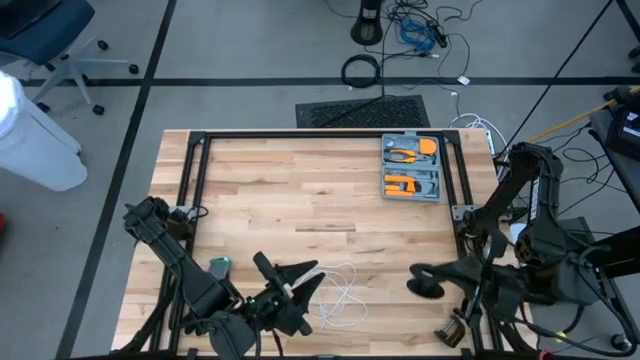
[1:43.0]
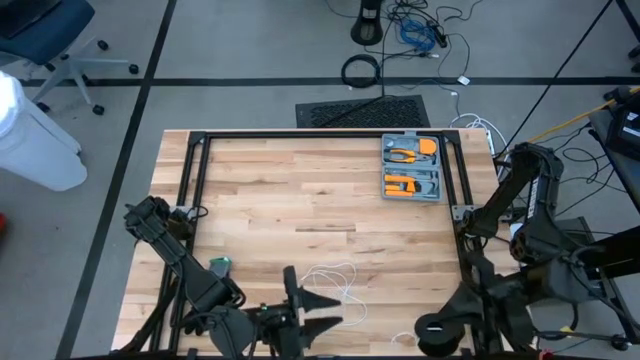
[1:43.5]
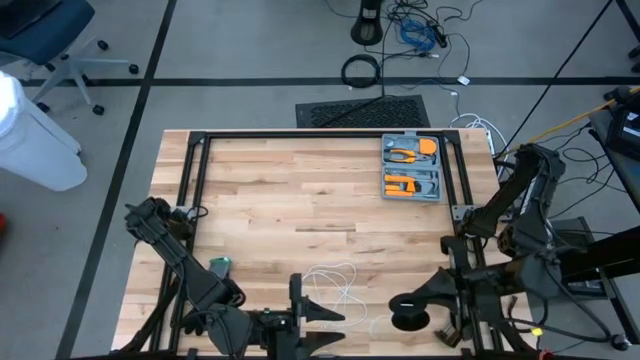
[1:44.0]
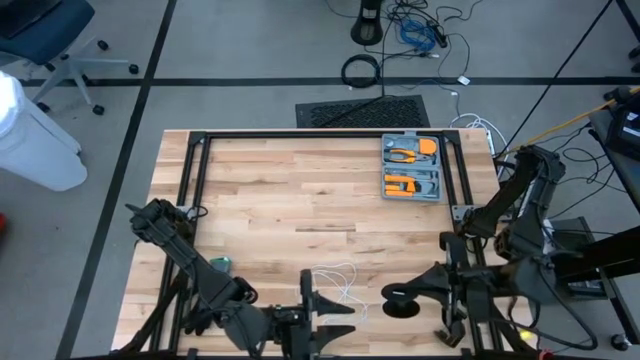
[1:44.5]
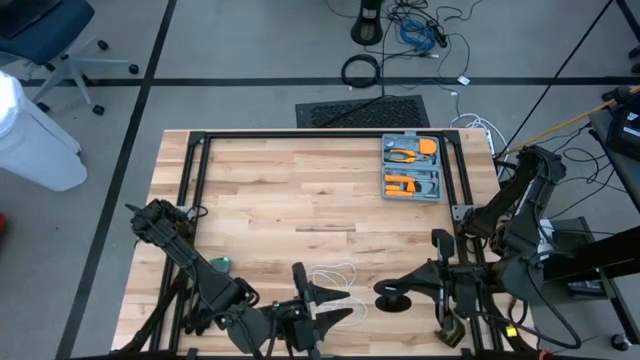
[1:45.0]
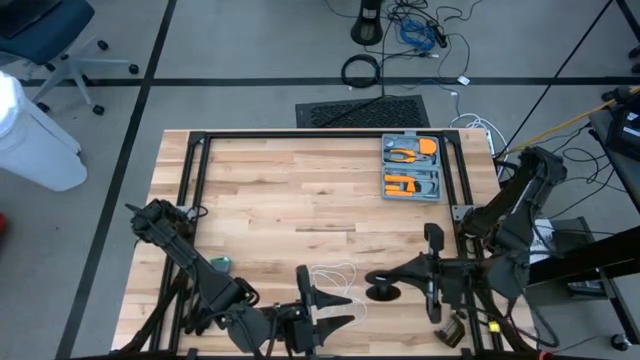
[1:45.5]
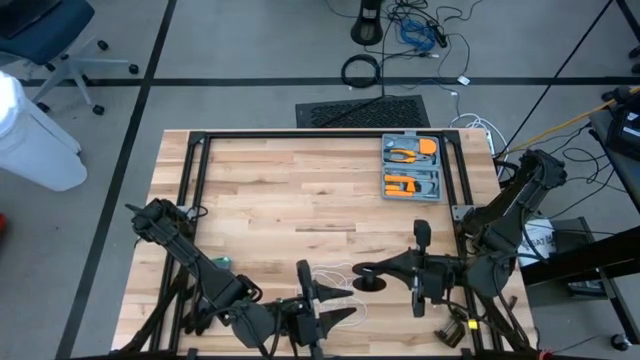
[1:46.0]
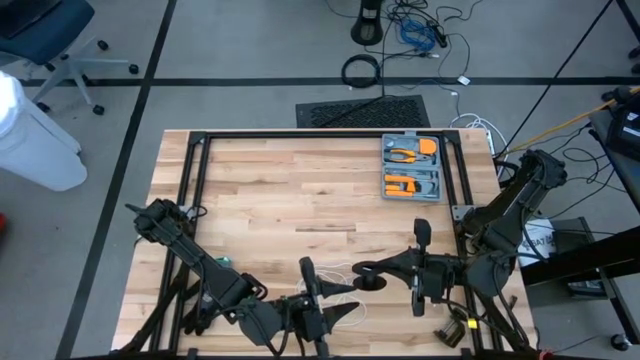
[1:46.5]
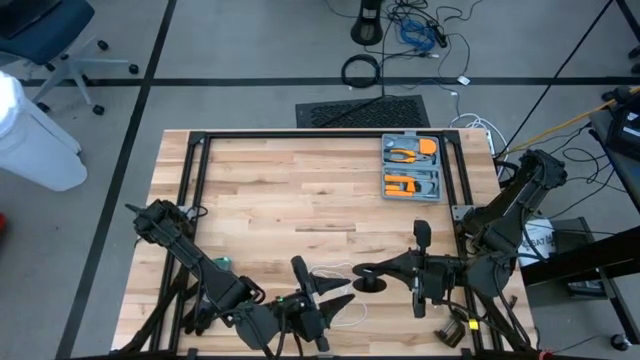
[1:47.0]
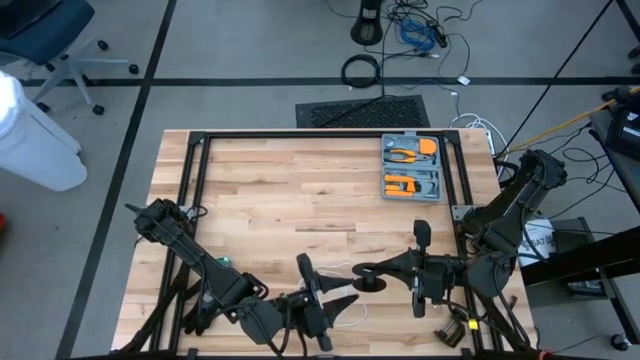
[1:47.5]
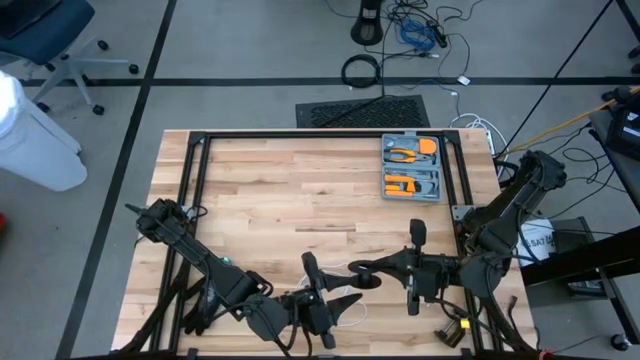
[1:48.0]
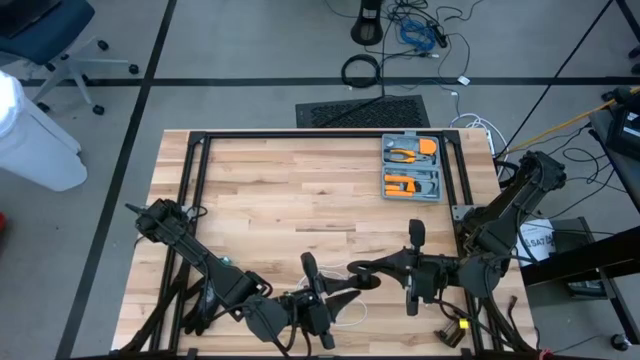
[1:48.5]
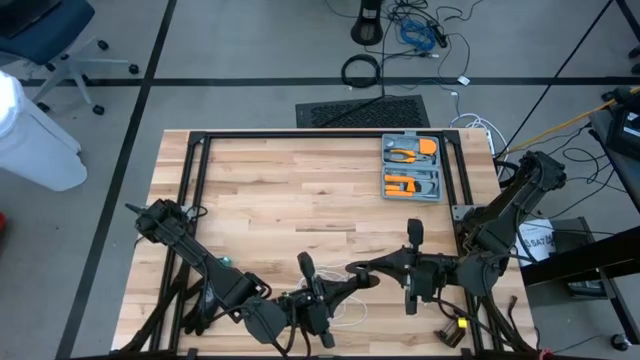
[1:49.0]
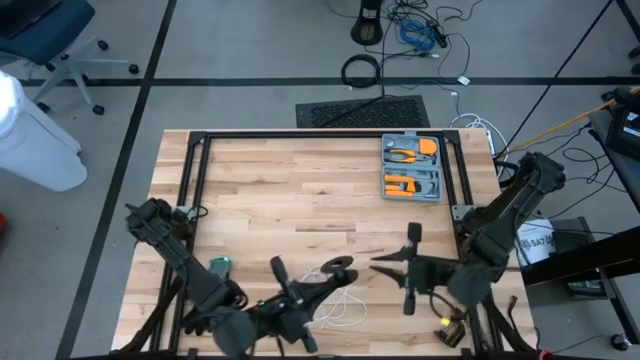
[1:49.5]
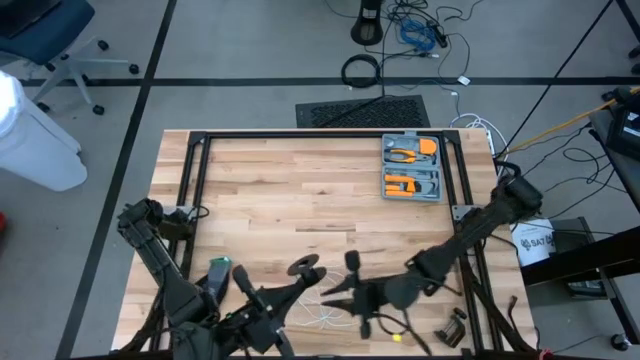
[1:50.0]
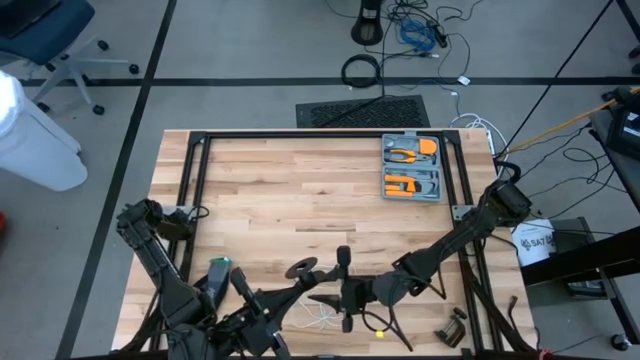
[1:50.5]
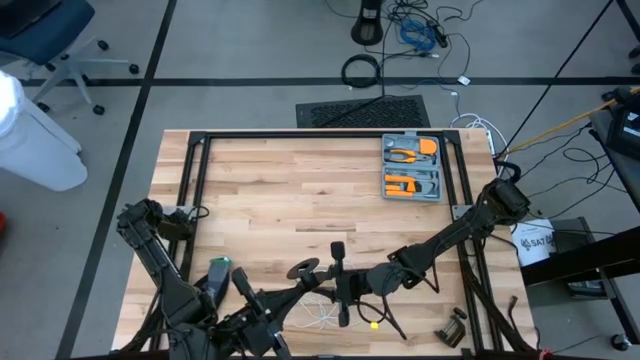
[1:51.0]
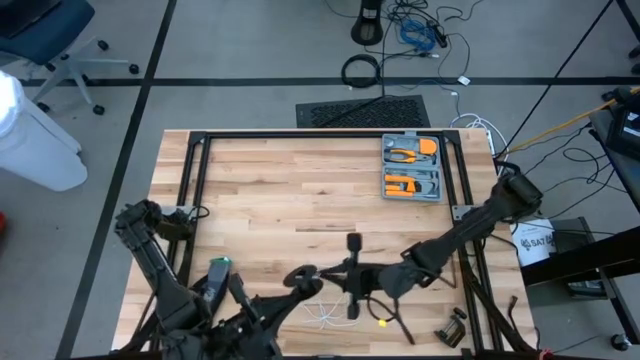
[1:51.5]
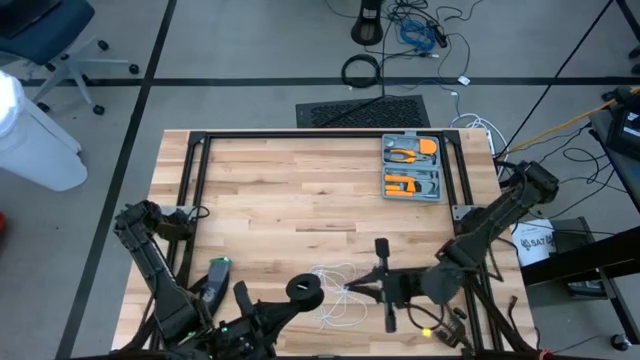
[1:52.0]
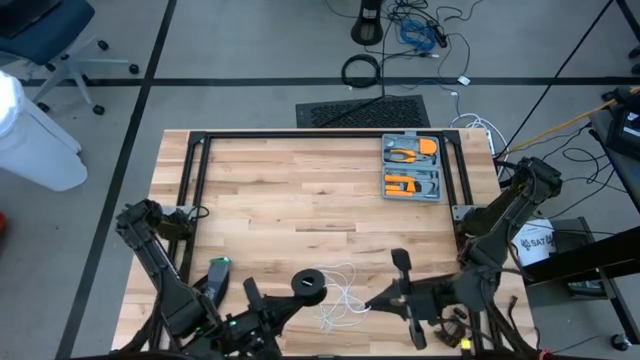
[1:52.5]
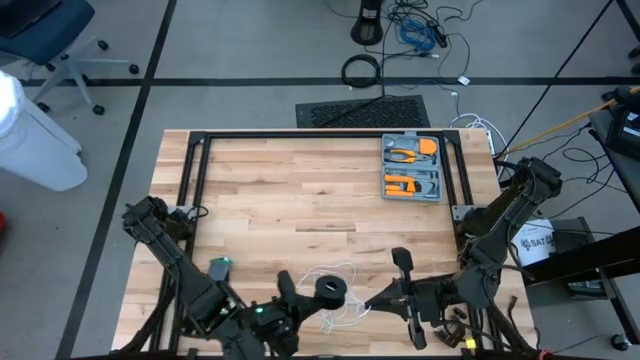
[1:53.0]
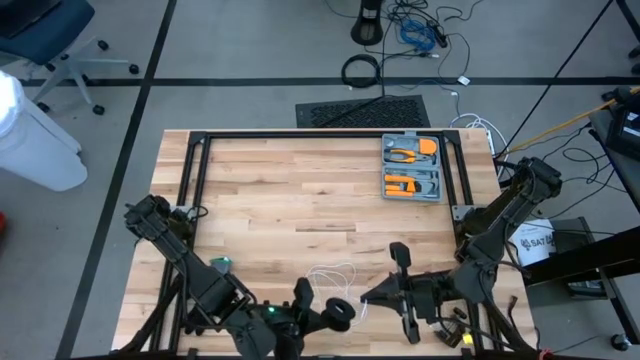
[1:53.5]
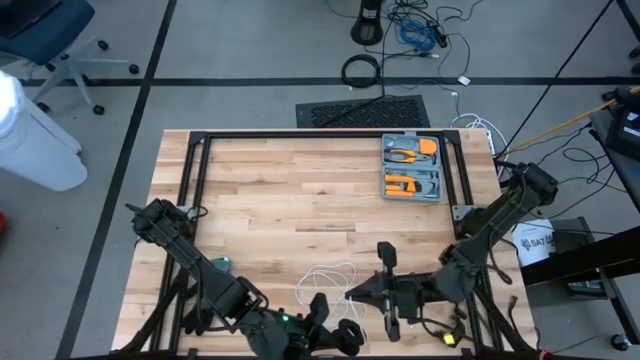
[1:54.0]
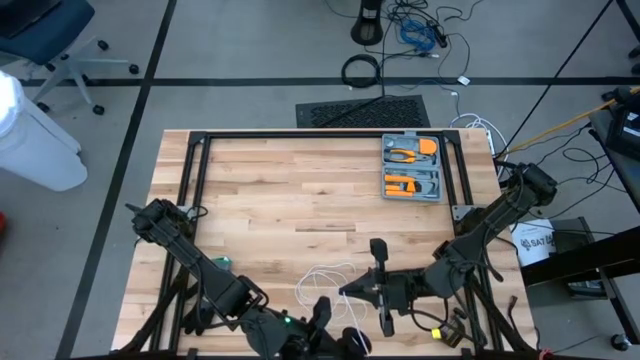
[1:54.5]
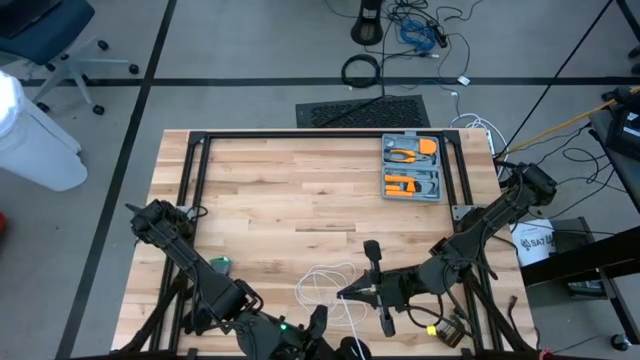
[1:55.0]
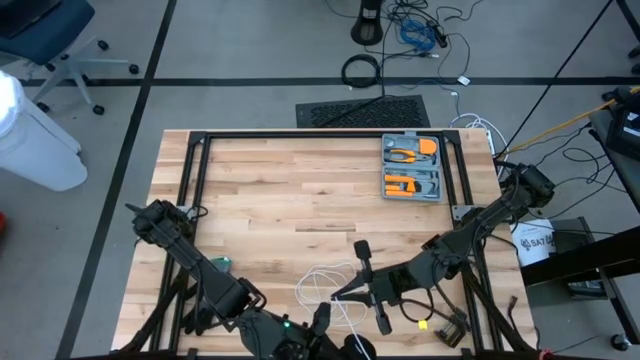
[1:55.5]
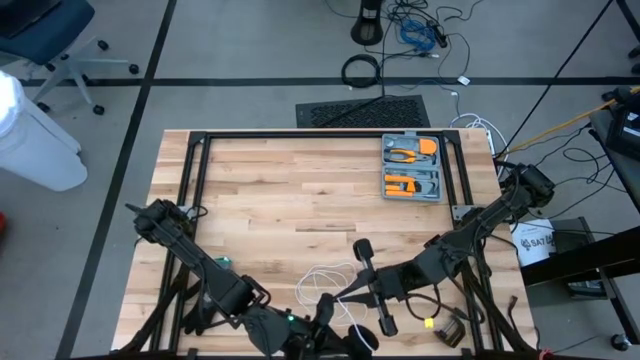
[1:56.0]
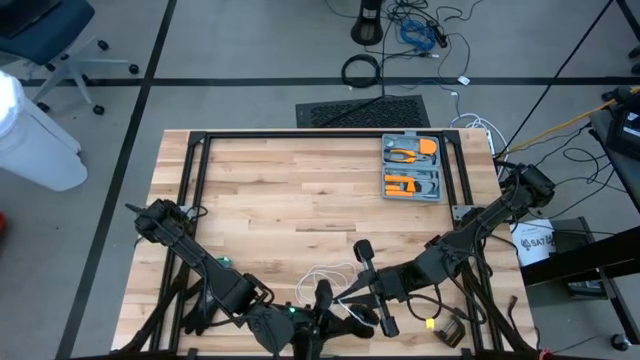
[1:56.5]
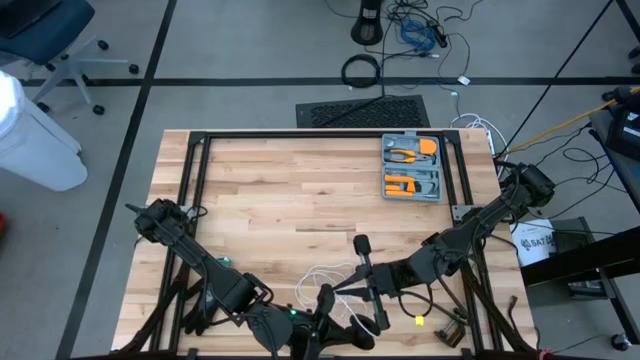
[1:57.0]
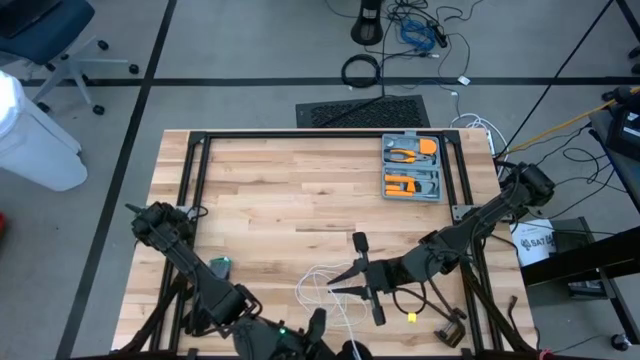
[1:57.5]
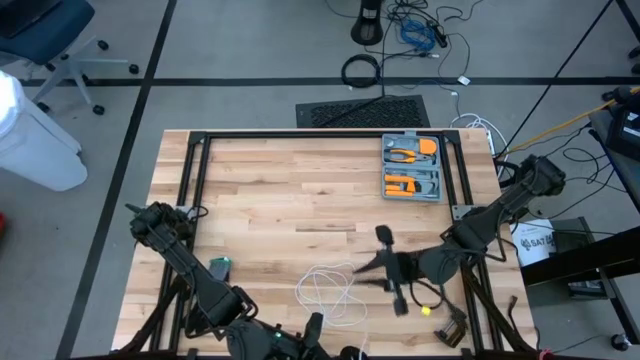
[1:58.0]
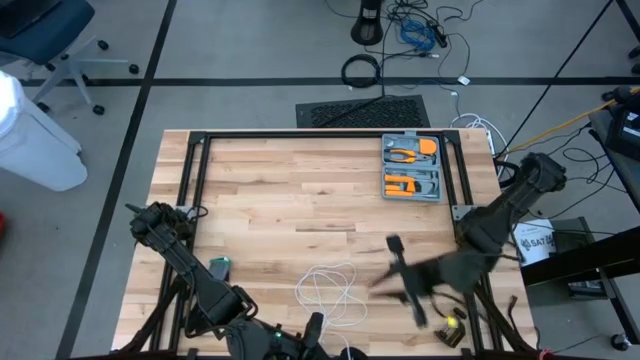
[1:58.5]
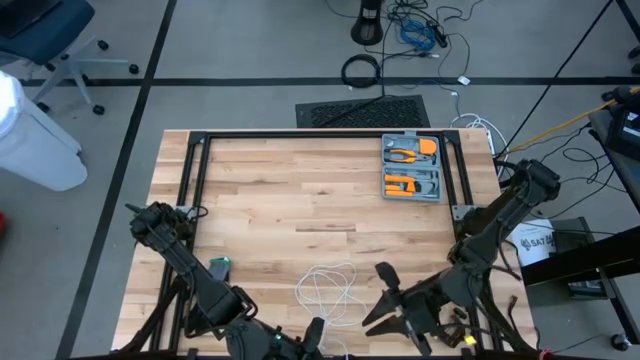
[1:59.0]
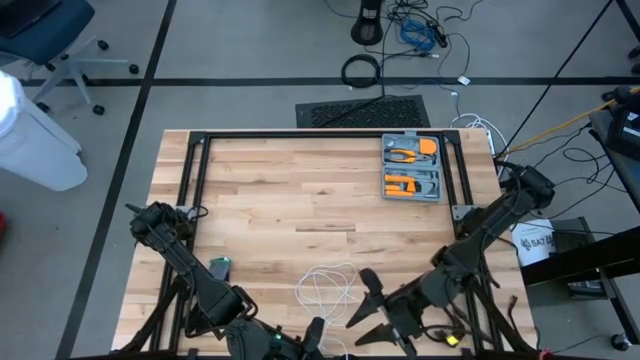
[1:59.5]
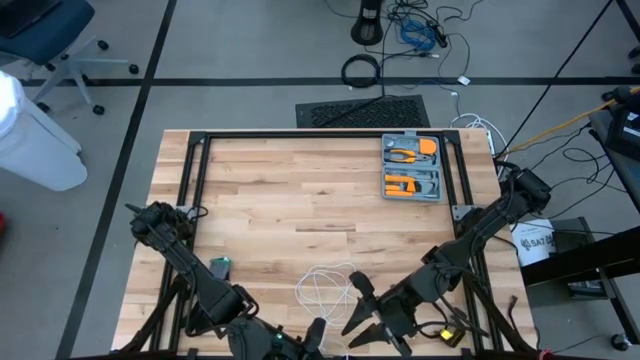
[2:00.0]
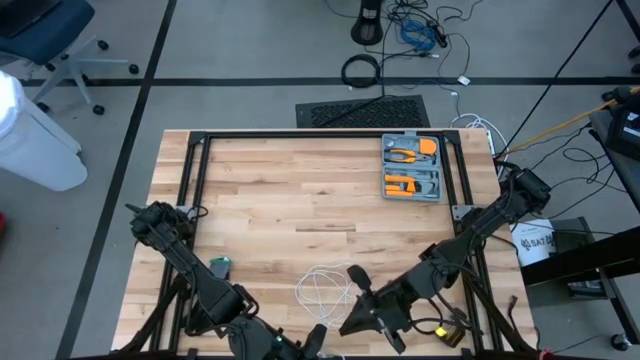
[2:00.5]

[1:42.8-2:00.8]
Task: Coil cords
Coil the white wire onto the spool
